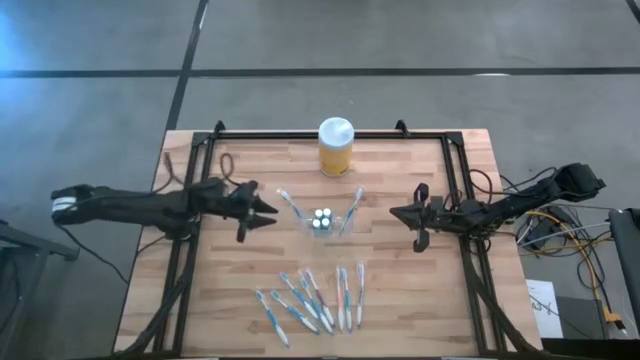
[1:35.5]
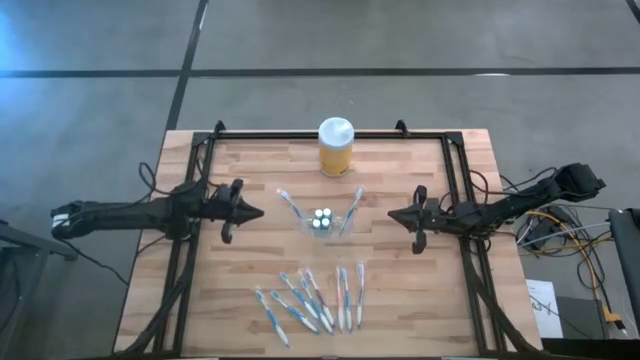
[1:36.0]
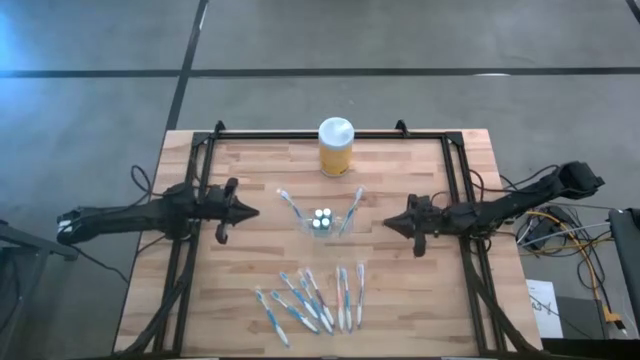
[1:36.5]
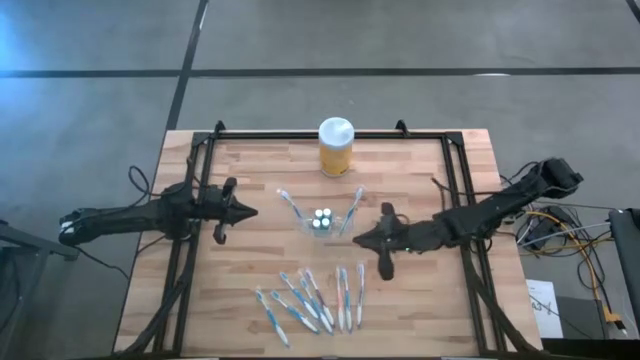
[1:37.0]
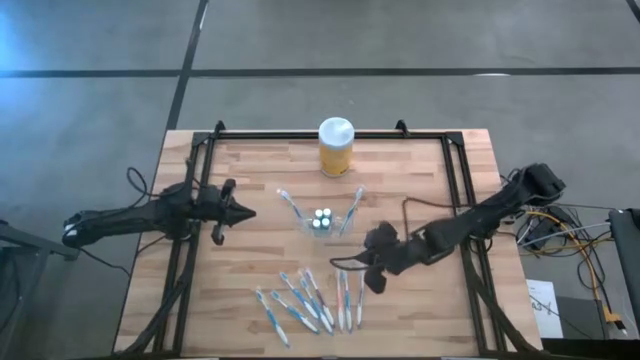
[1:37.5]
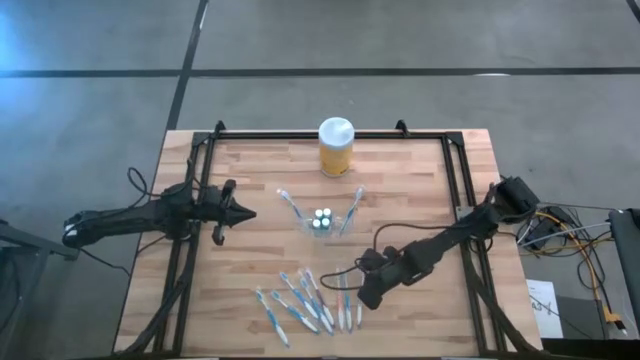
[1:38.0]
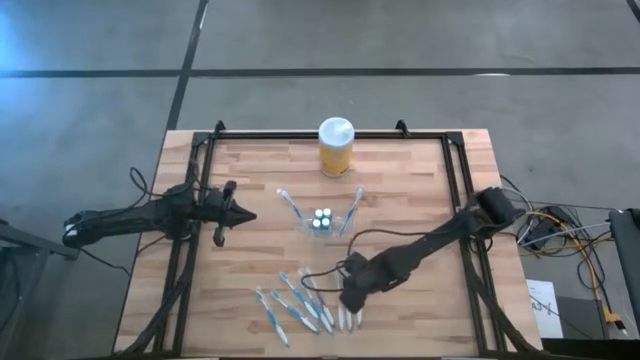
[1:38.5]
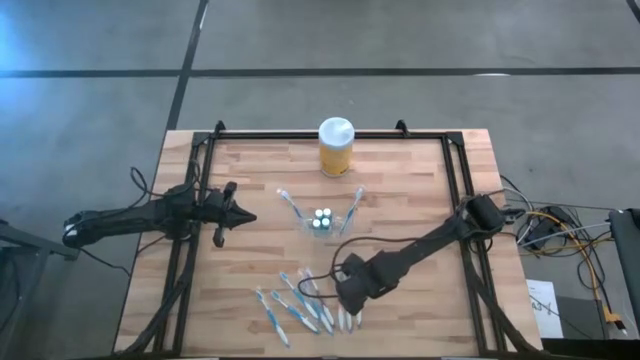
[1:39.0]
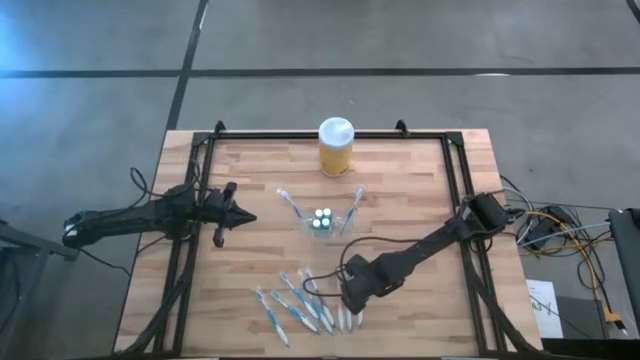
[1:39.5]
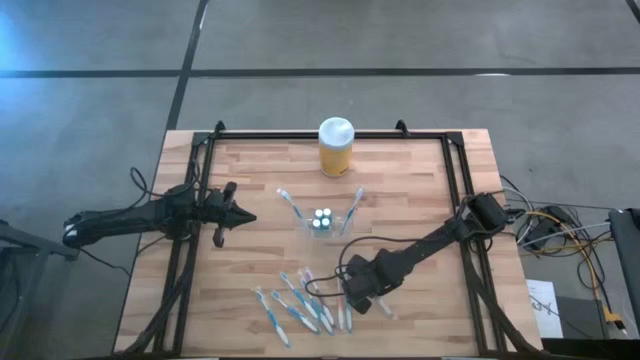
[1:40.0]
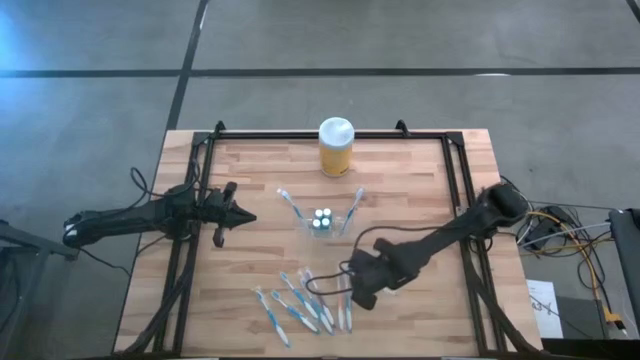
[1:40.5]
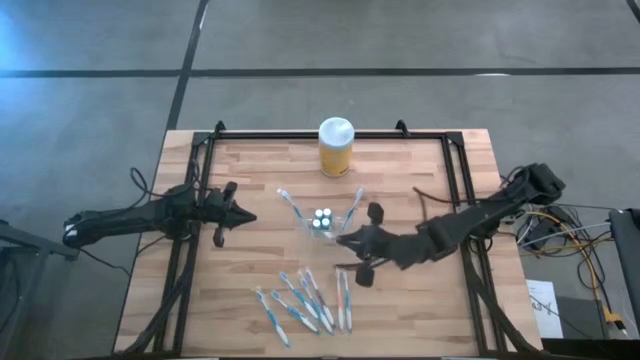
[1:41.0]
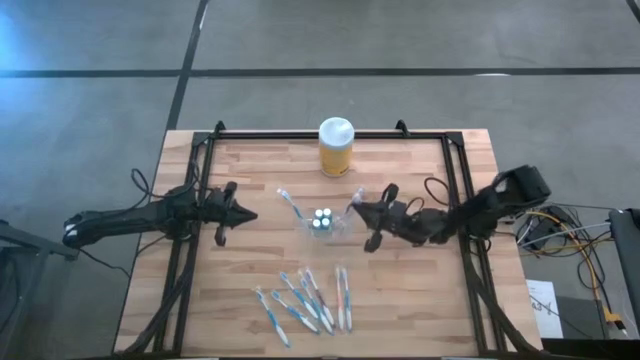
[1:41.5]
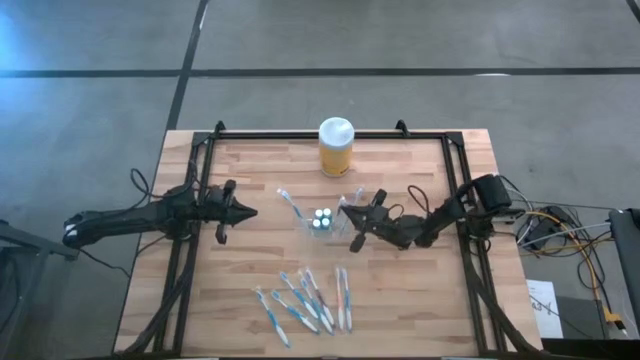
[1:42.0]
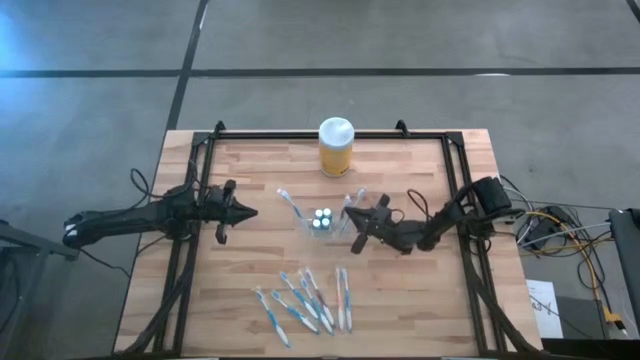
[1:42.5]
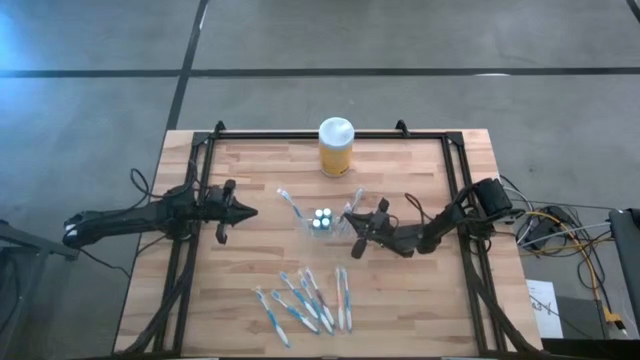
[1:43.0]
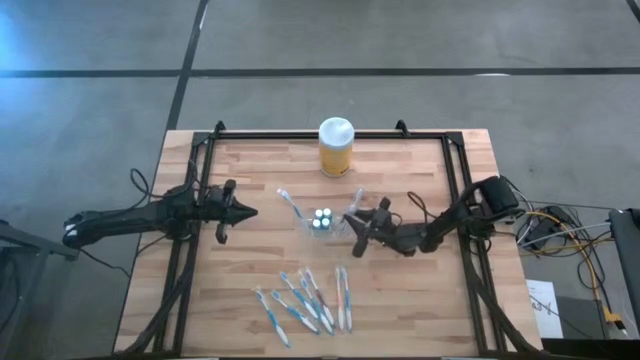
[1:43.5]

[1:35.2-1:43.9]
Task: Pick & Place toothbrushing station
Put the purple toothbrush into the transparent organizer

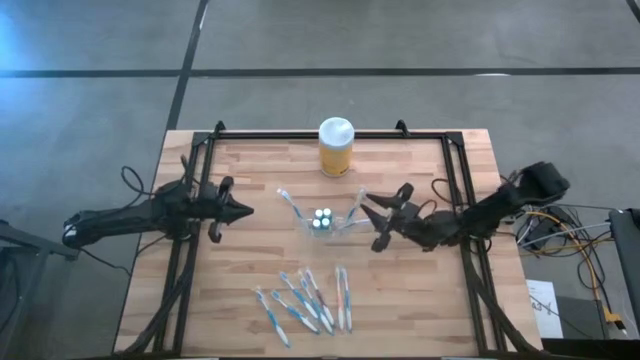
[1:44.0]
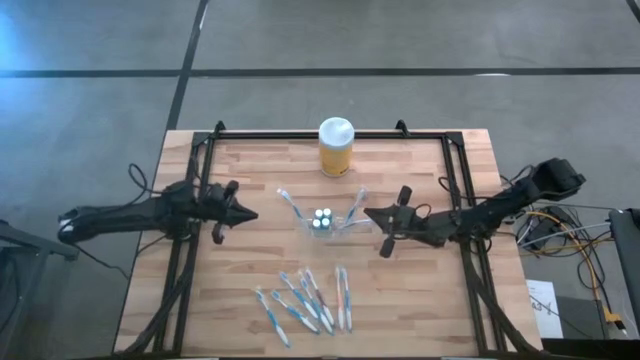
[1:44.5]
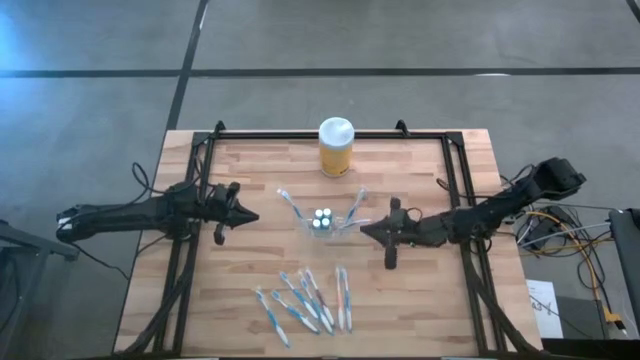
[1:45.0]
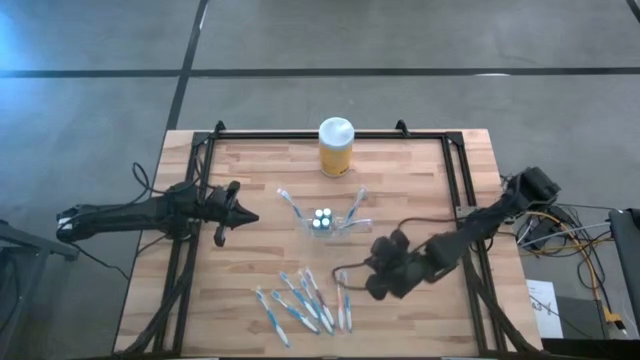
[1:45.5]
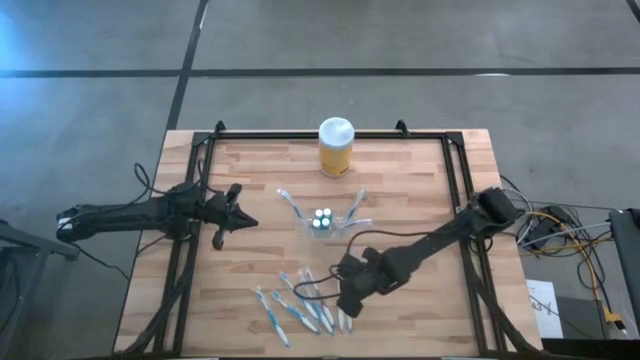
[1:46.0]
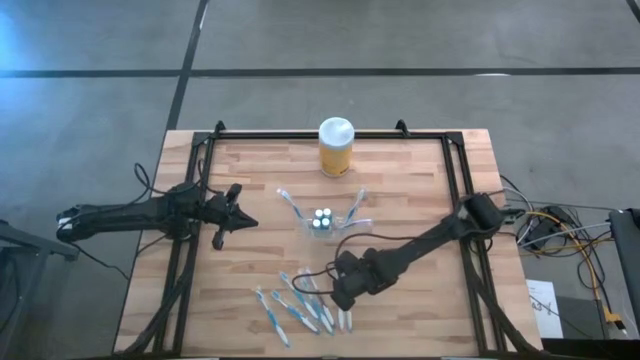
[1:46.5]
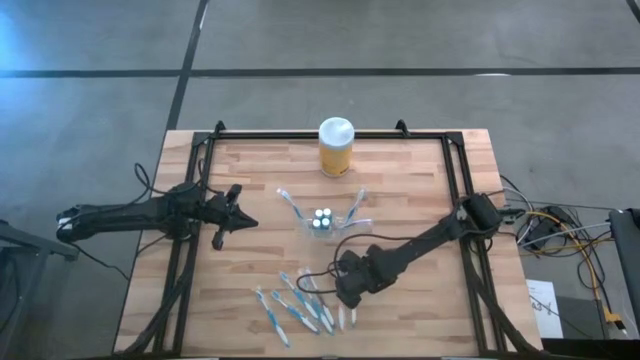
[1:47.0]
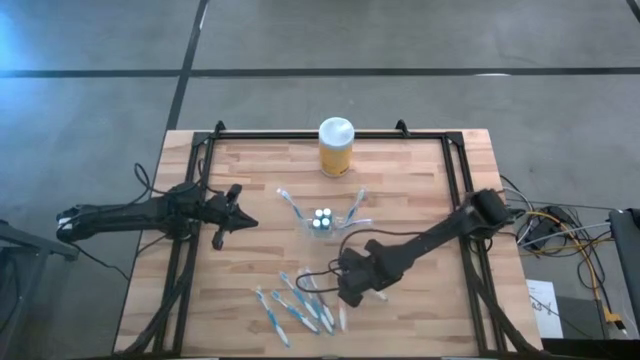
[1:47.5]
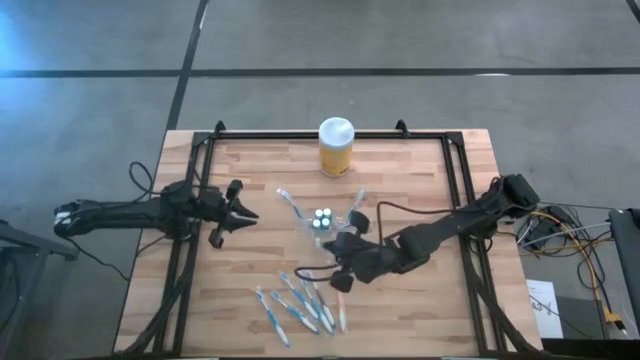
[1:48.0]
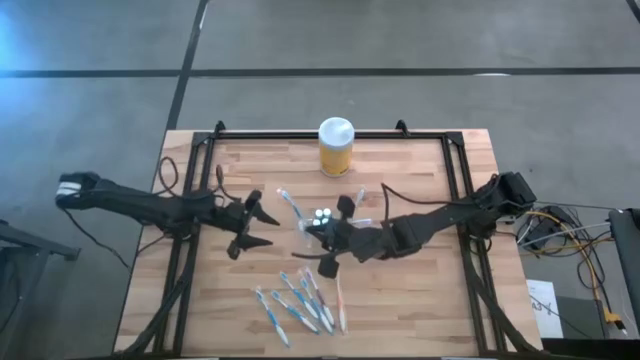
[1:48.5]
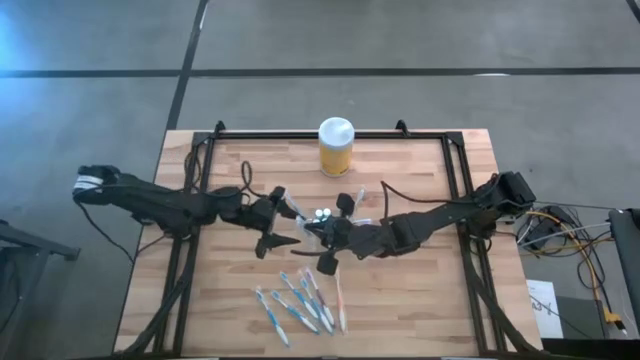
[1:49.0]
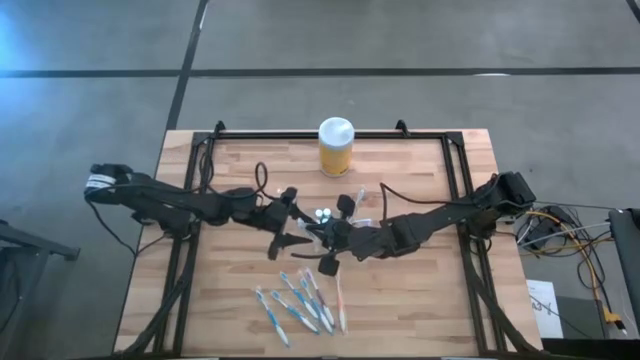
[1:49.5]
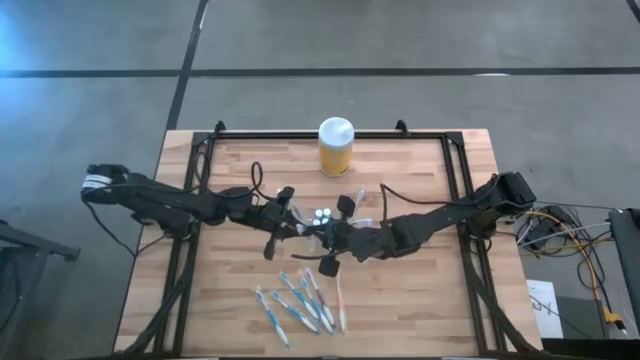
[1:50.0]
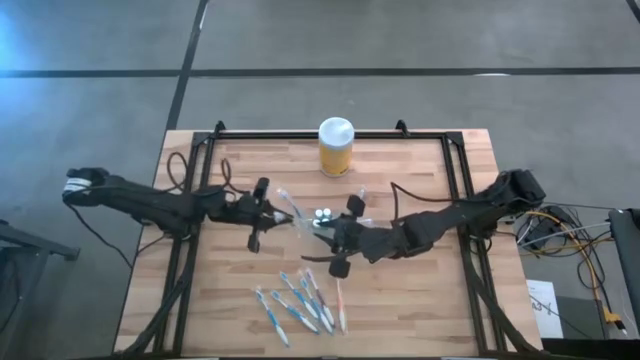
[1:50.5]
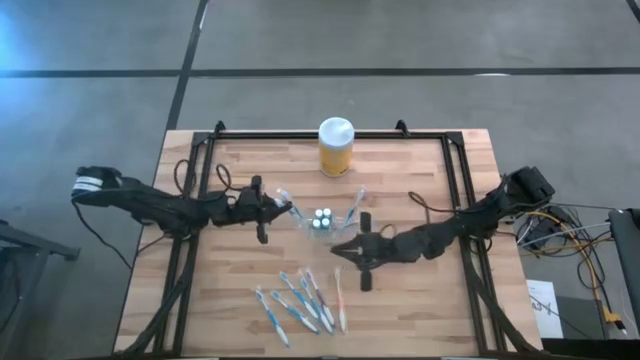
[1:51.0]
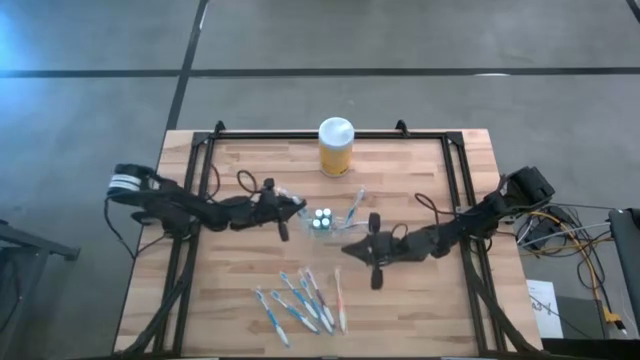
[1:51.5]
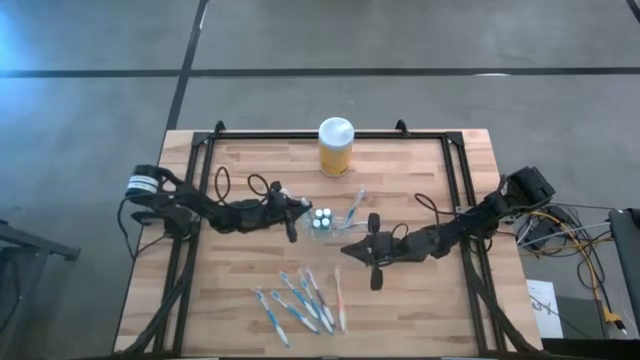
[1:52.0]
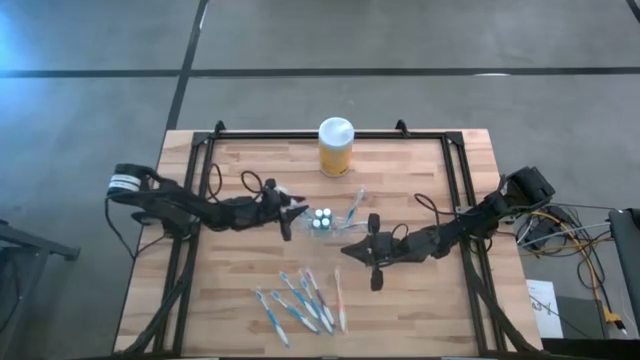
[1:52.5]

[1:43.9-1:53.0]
Put the blue toothbrush into the transparent organizer

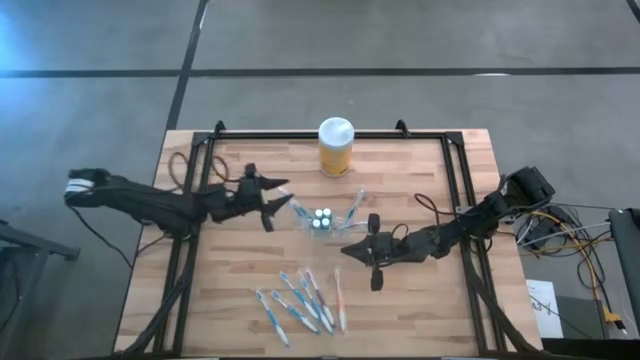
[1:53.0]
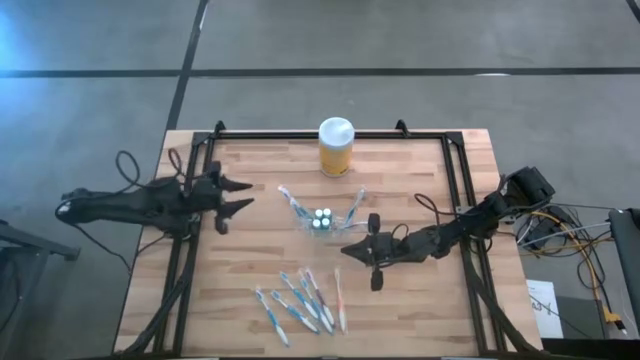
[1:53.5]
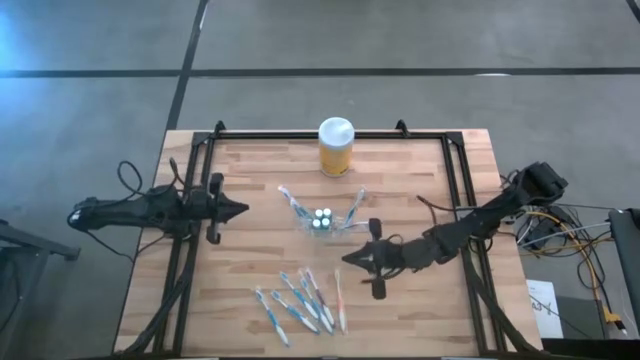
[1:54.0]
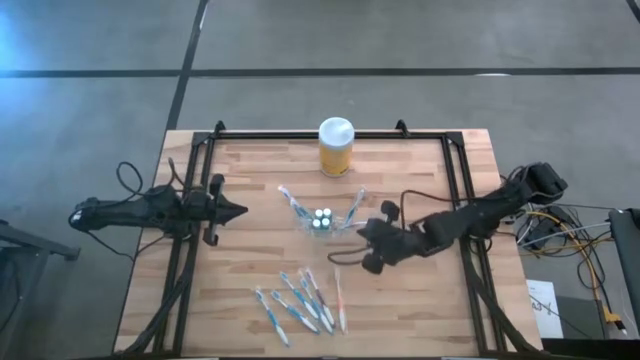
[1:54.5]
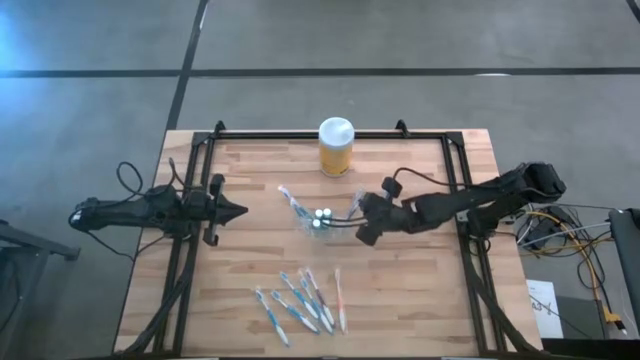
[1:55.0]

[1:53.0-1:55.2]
Adjust the toothbrush in the transparent organizer

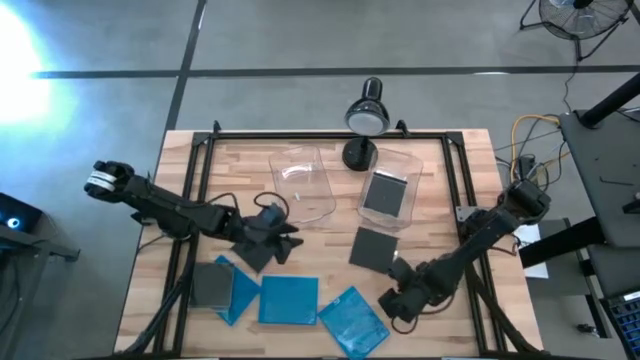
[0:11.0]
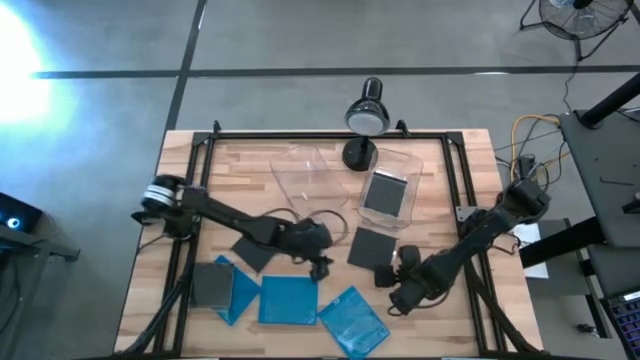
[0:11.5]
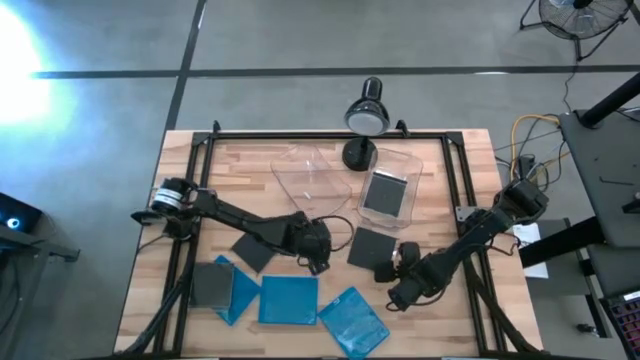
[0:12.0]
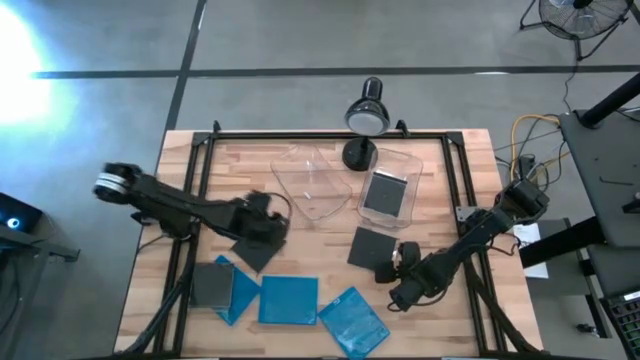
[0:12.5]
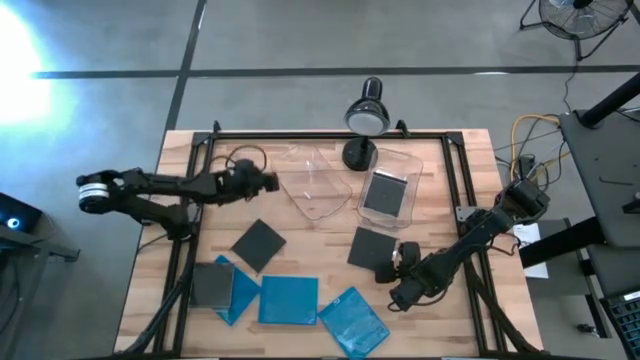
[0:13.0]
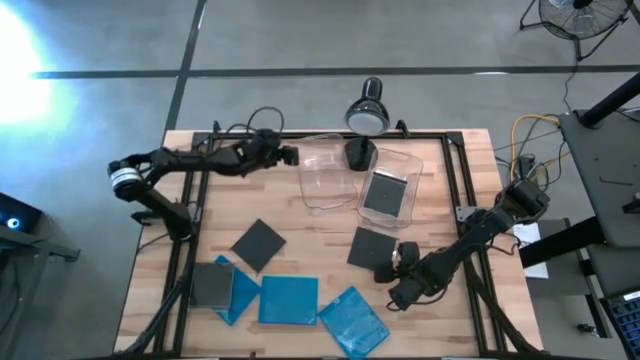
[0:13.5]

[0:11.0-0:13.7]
Task: Pick & place jewel cases by type
Adjust the left transparent bin
